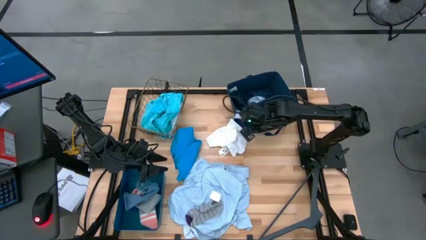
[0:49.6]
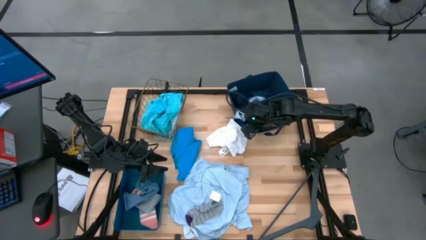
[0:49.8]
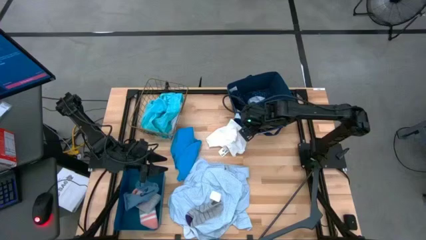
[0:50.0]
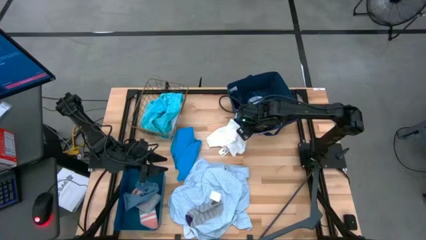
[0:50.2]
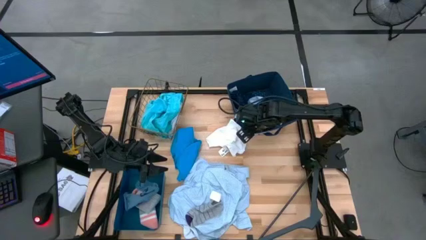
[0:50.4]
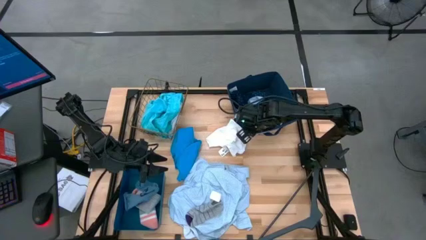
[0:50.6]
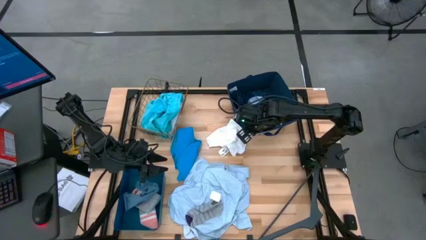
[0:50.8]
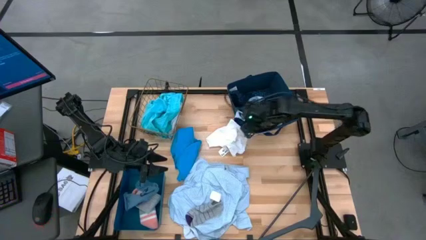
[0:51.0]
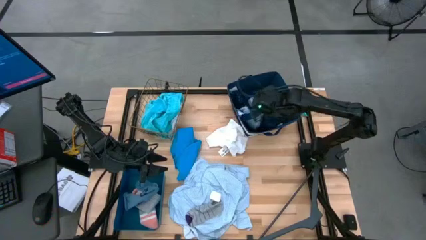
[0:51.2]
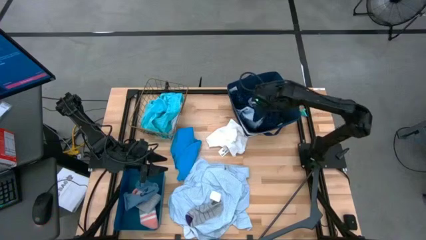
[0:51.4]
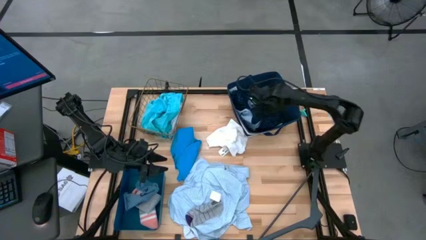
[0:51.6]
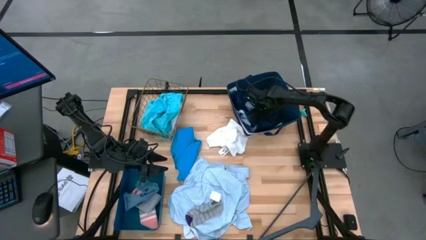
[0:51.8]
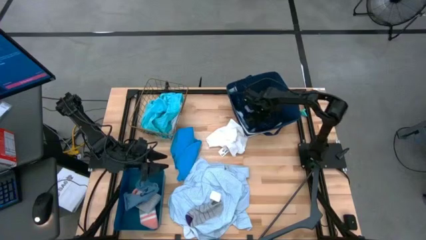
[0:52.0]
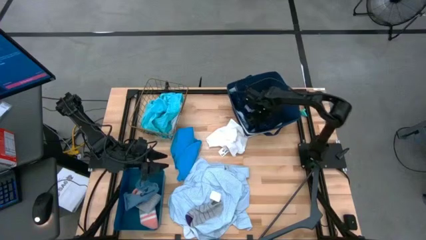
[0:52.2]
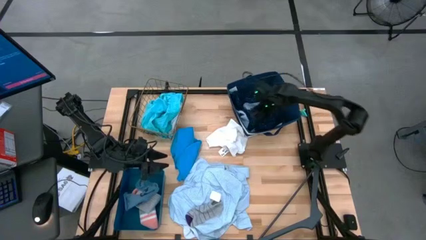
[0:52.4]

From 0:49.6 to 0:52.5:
Task: Pick & Place Cloths
Put the dark blue polo shirt into the blue laundry bin

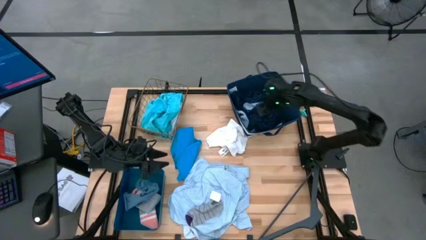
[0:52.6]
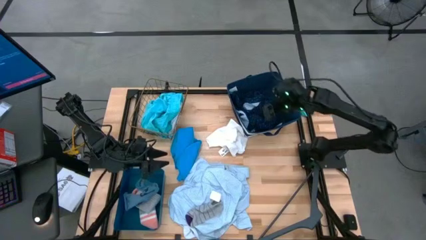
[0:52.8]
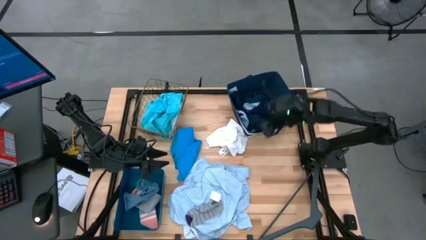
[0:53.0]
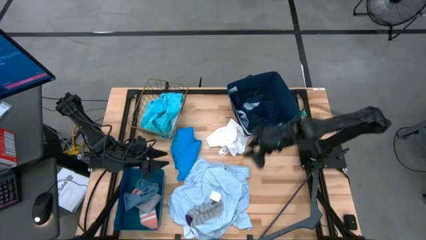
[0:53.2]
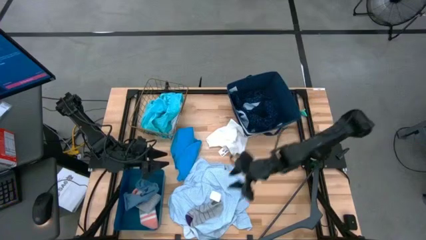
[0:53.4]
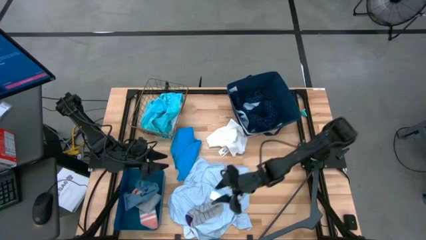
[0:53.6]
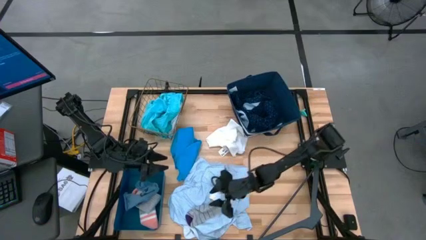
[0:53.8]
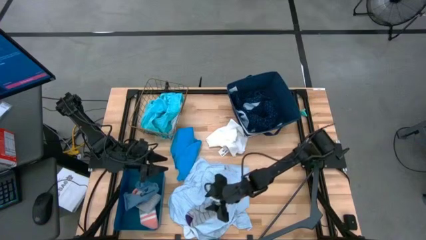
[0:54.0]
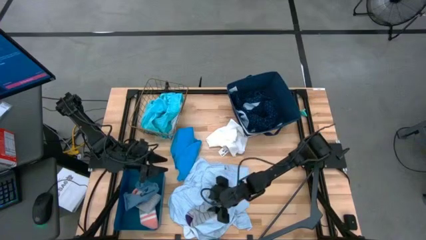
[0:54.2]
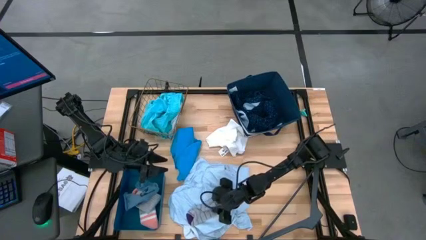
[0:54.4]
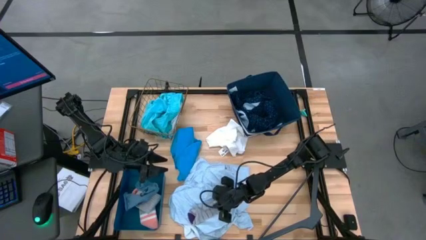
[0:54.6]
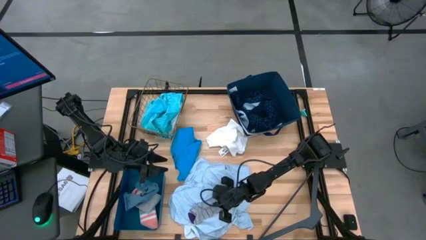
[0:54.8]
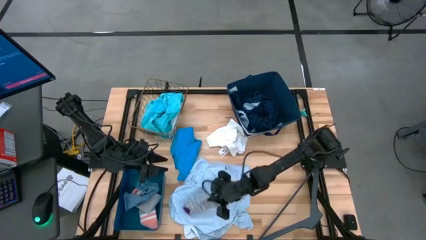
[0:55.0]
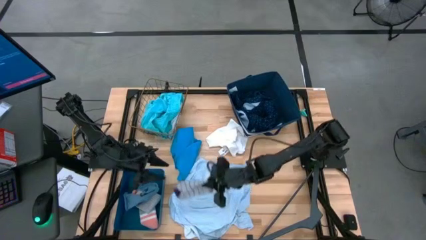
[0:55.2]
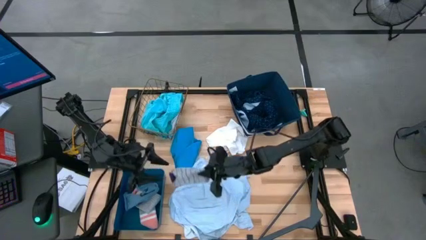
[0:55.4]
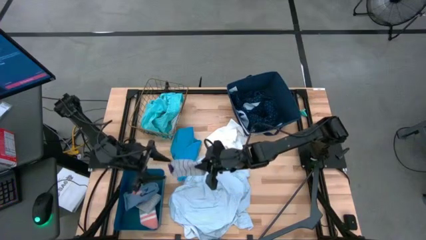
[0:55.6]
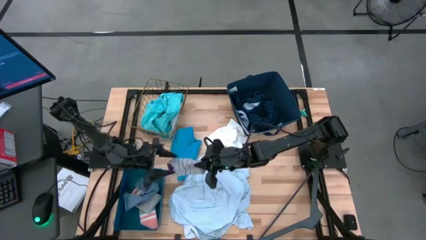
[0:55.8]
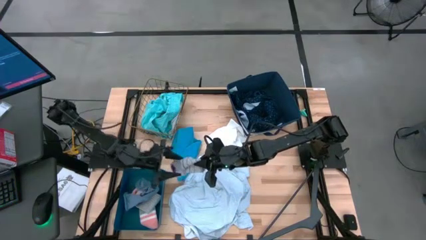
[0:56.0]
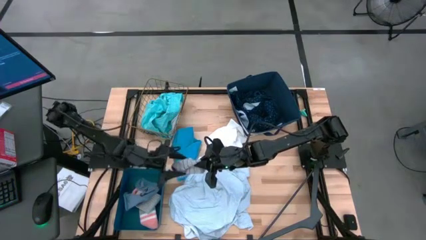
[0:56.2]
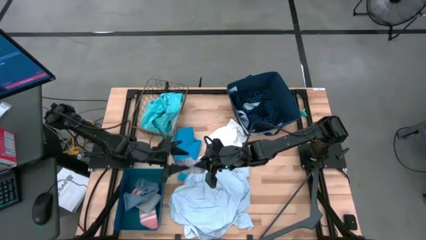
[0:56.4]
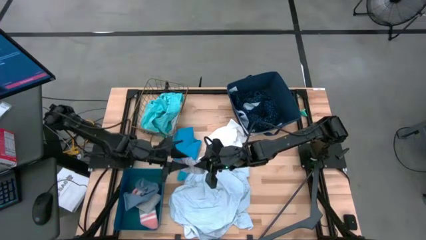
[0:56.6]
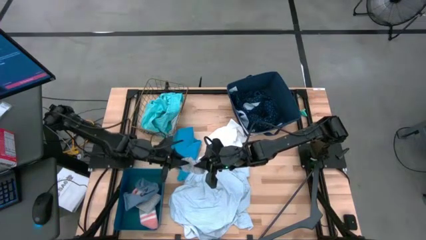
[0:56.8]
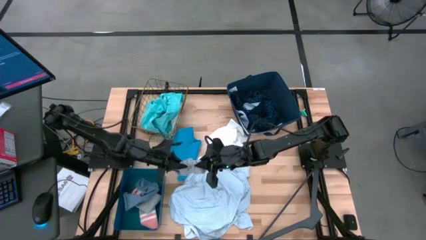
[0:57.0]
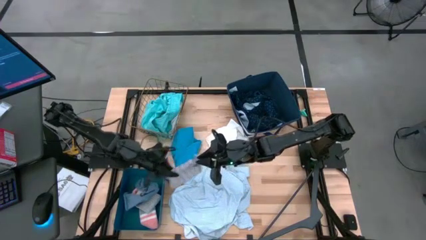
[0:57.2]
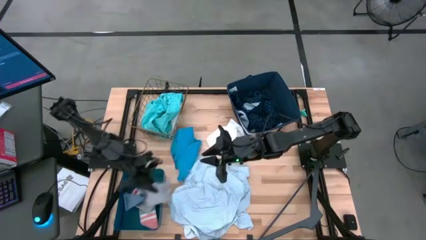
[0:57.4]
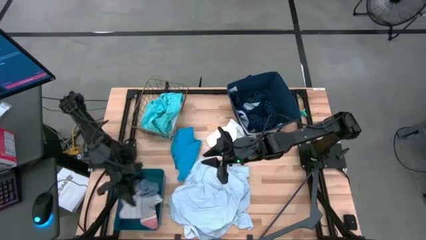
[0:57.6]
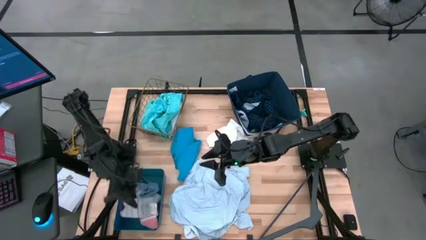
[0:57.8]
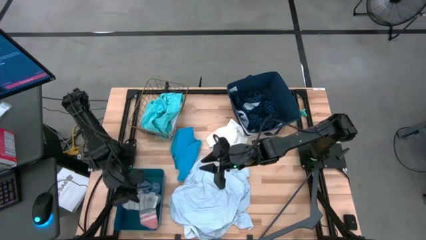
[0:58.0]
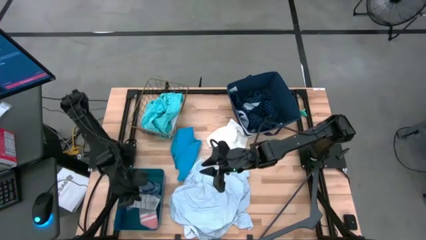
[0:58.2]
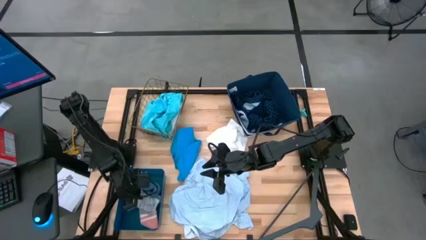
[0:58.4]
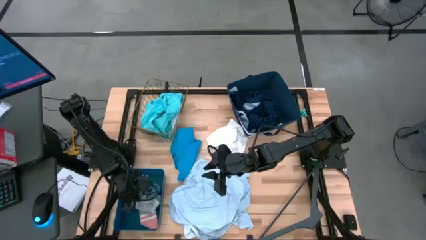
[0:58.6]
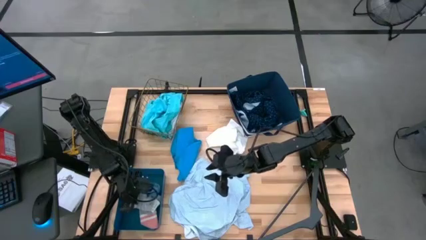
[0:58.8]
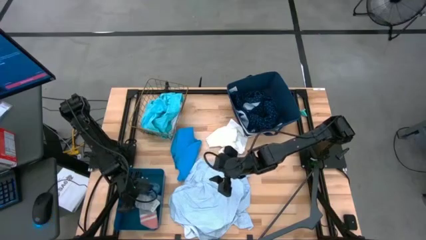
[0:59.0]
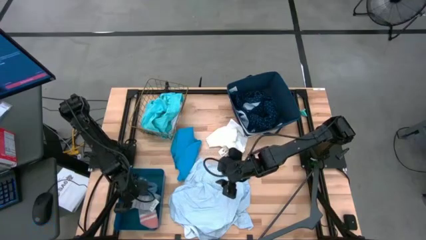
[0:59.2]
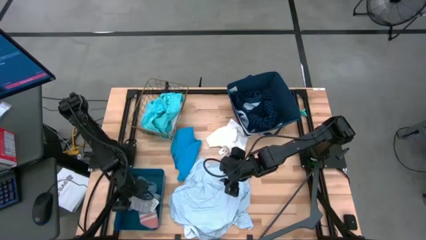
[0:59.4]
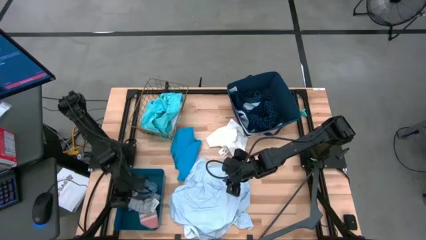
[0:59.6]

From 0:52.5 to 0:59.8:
Put the gray sock into the blue bin

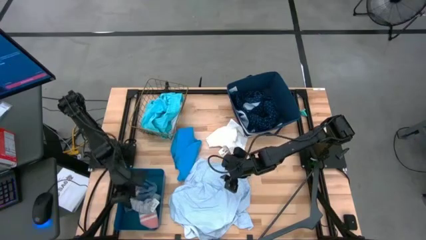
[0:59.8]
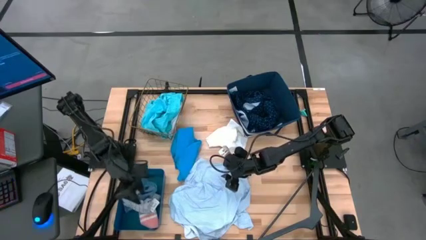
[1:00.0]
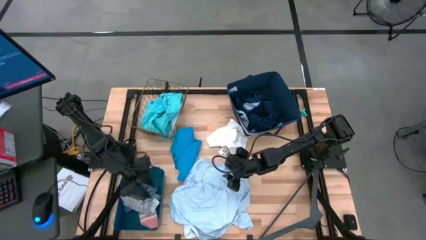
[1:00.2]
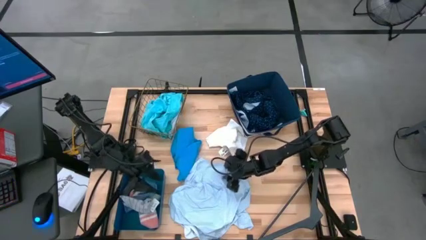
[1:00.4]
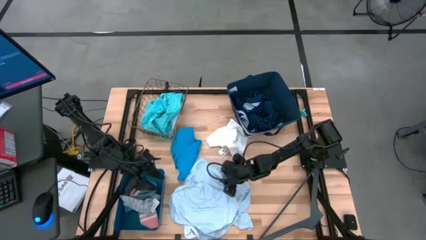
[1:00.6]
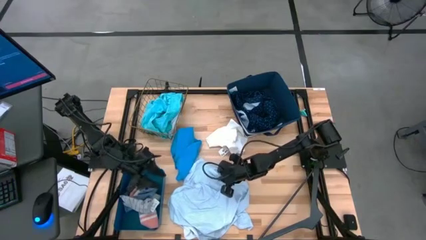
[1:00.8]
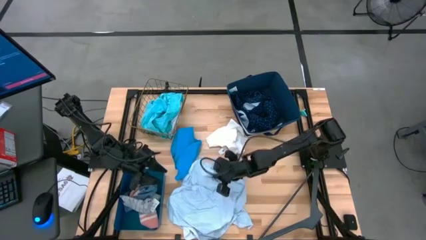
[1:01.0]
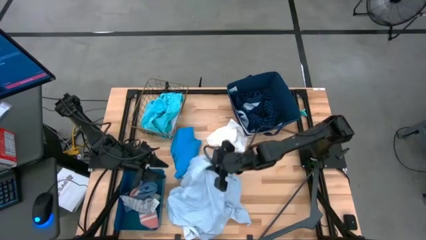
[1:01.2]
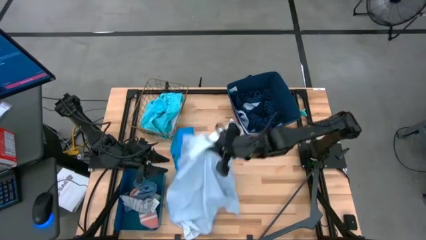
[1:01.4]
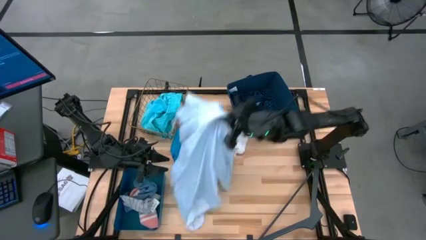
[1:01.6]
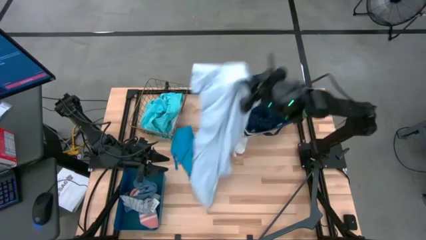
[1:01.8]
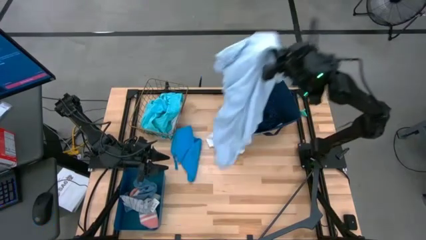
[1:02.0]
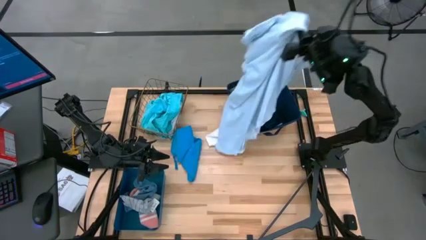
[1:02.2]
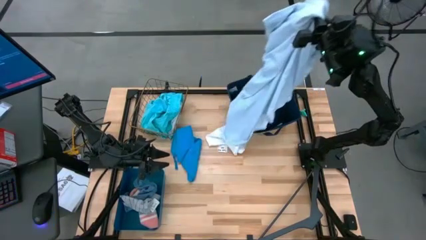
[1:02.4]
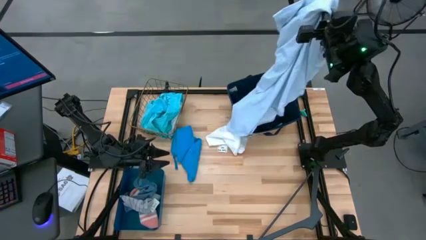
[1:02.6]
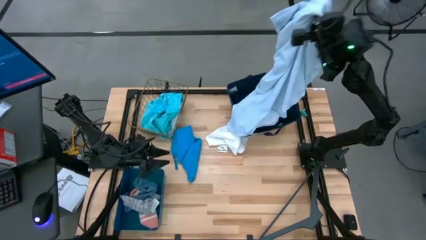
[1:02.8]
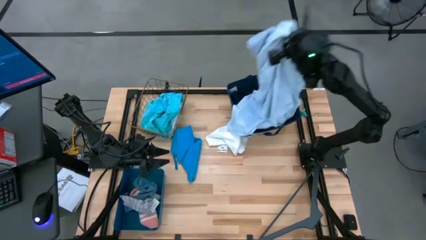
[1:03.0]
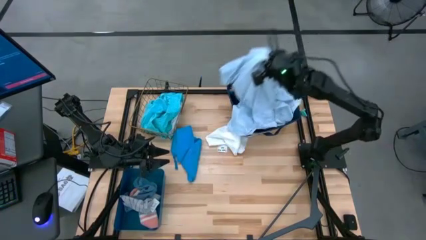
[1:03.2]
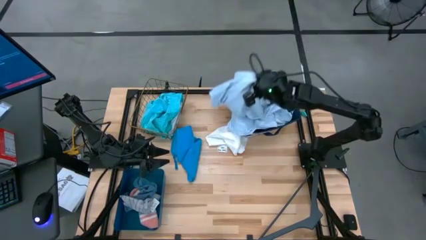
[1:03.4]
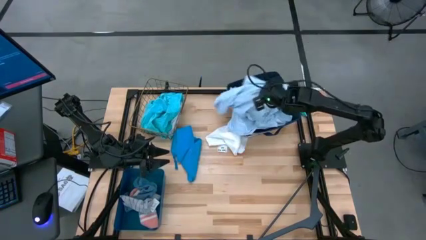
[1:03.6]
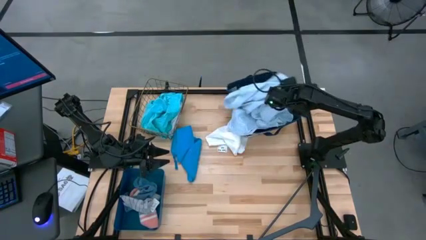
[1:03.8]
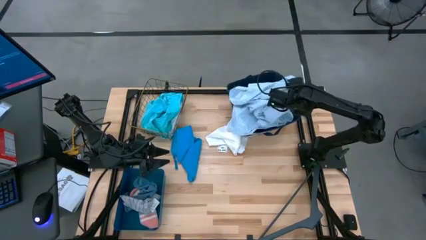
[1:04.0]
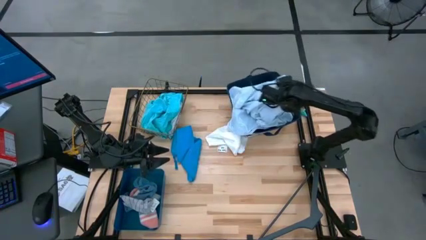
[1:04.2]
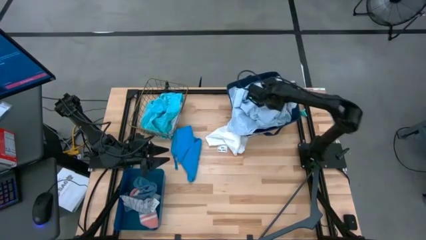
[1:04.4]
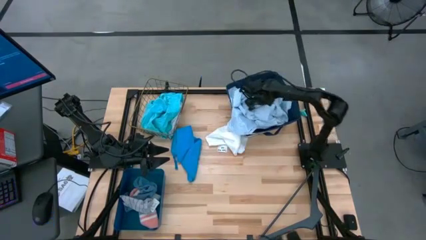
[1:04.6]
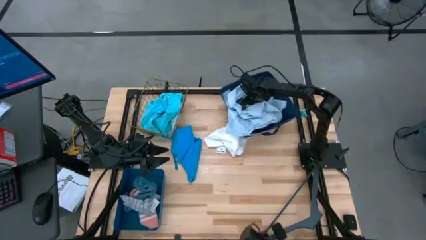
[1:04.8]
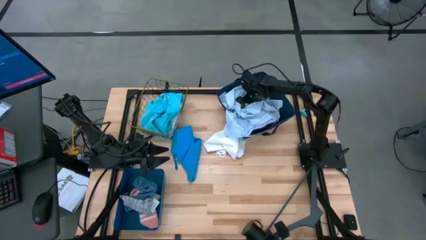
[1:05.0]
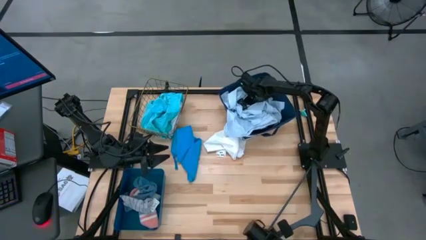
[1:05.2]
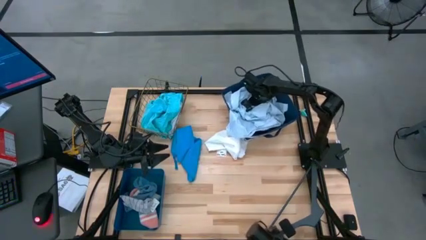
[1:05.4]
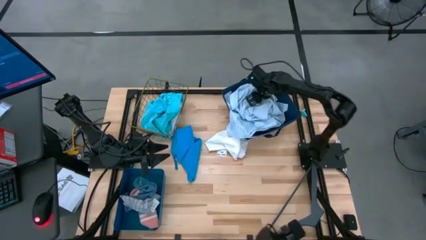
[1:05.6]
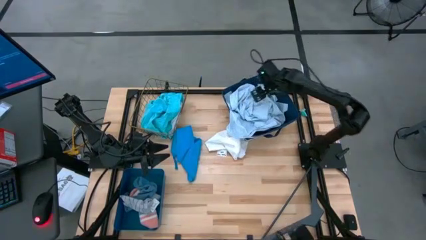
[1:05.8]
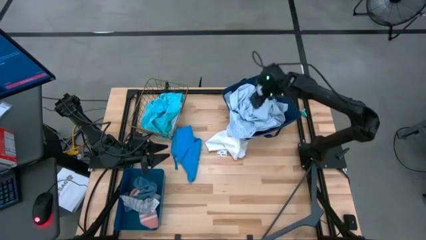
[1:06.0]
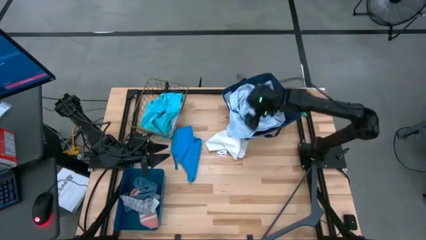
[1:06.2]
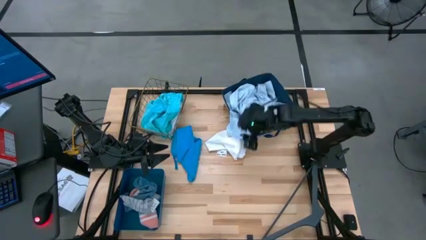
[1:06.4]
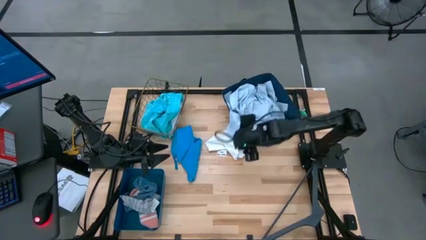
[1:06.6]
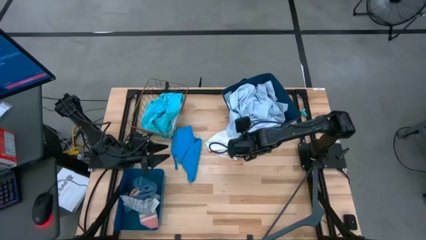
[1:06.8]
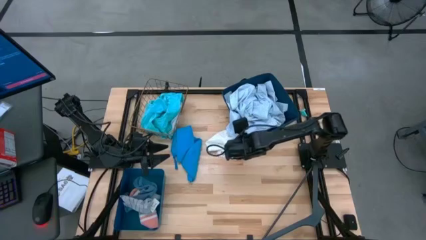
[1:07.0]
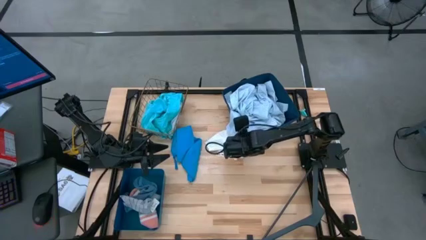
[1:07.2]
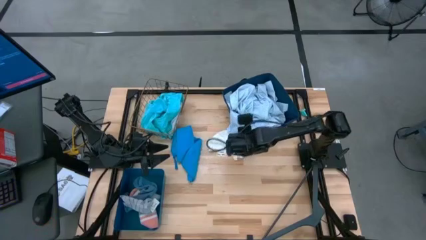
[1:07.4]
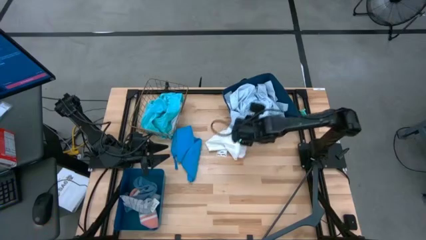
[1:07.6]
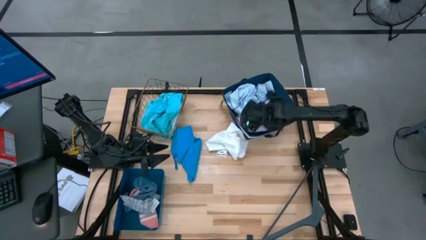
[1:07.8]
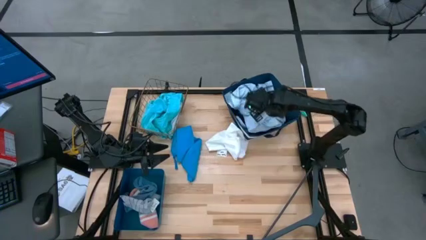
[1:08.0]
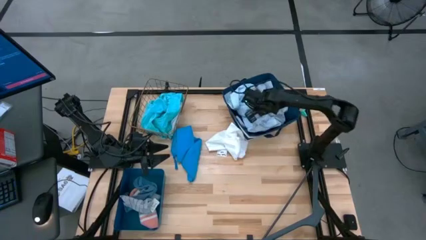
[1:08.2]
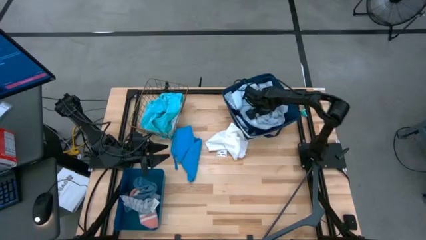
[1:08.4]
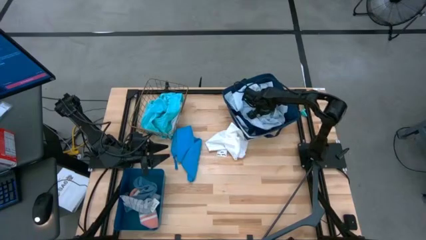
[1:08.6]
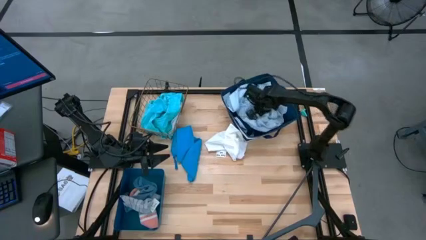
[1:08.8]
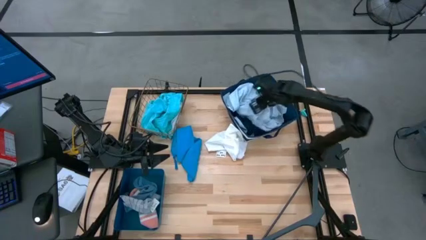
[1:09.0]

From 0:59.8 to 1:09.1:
Put the blue polo shirt into the blue laundry bin
